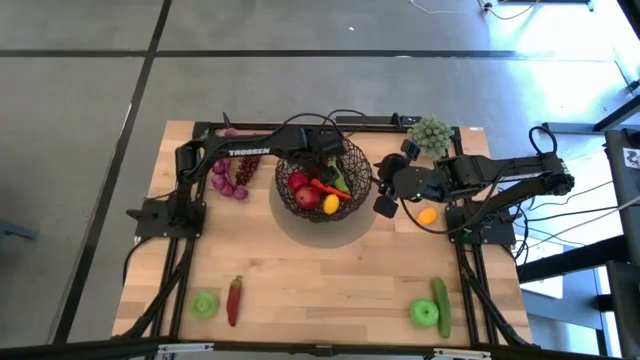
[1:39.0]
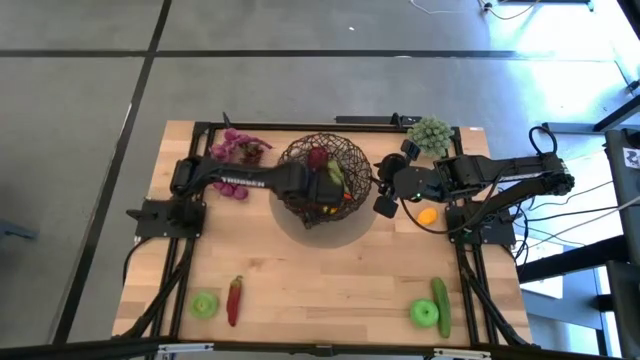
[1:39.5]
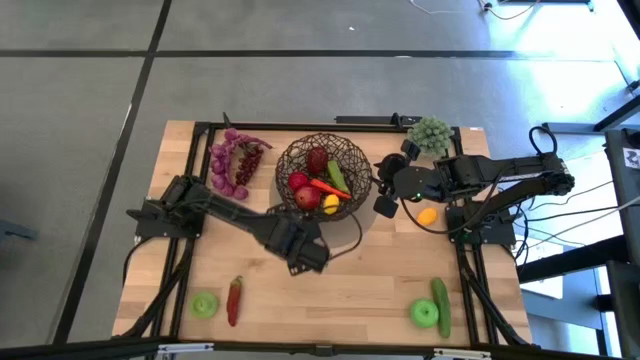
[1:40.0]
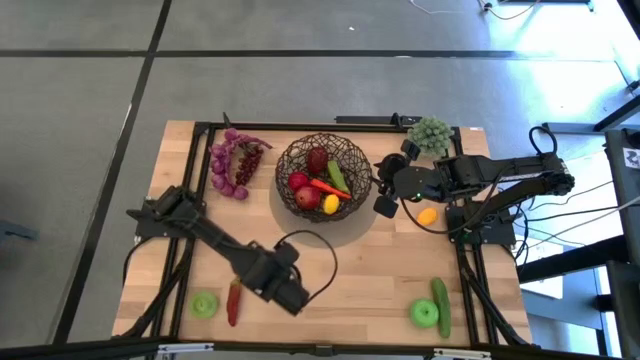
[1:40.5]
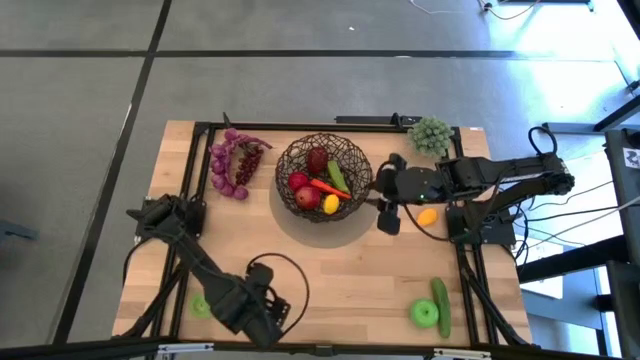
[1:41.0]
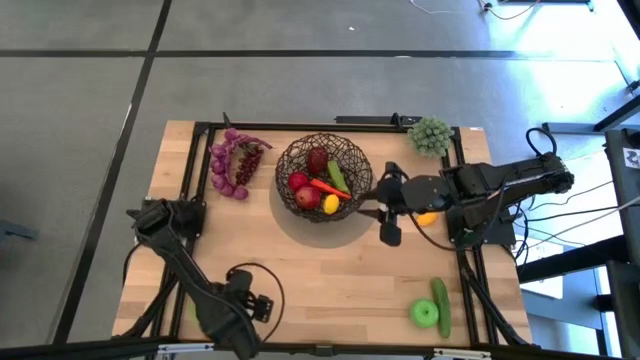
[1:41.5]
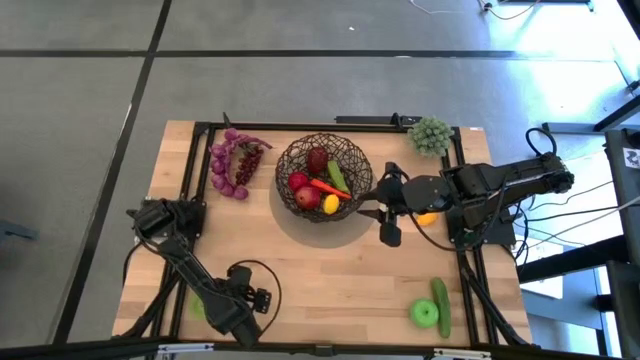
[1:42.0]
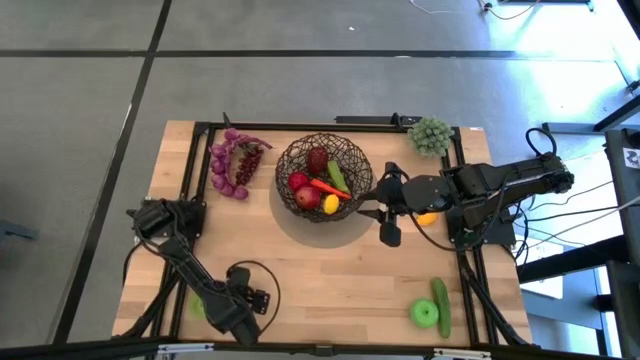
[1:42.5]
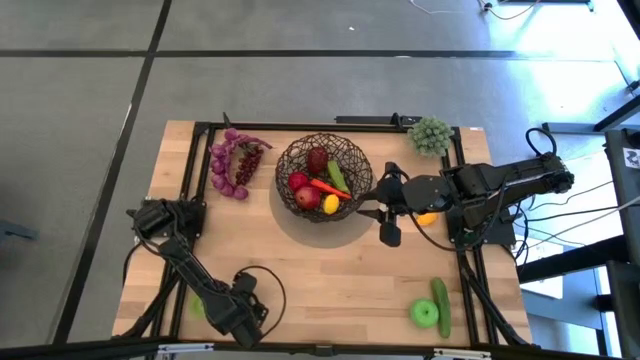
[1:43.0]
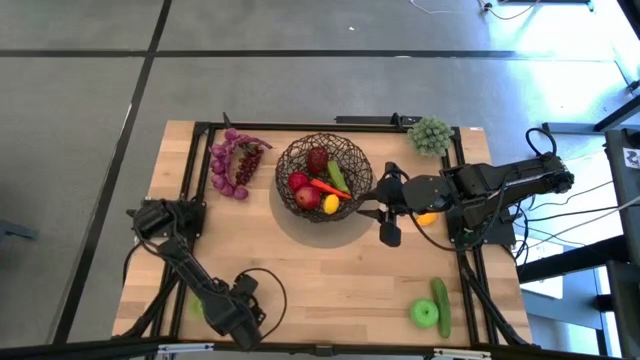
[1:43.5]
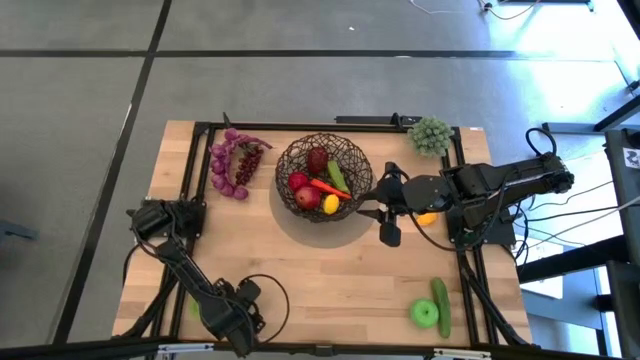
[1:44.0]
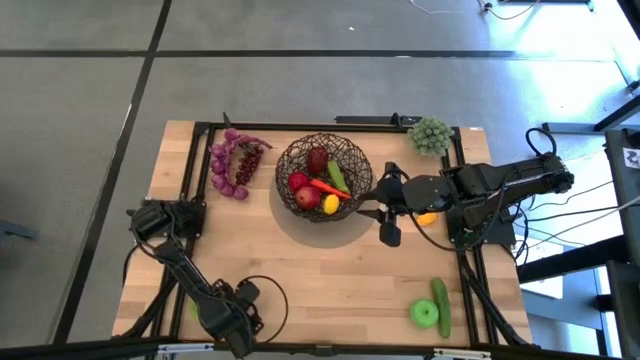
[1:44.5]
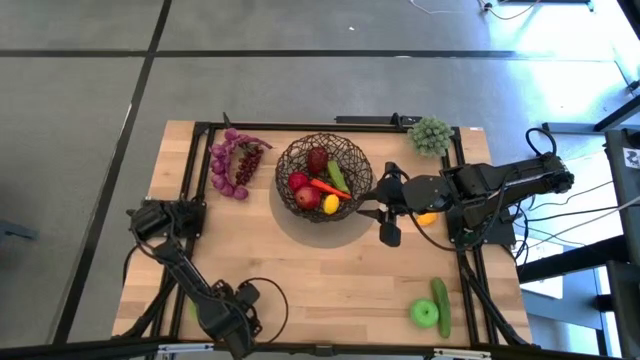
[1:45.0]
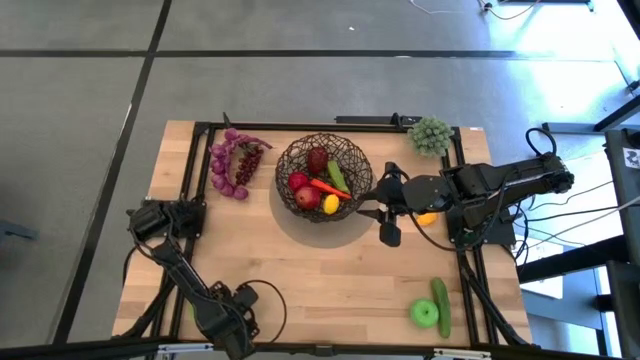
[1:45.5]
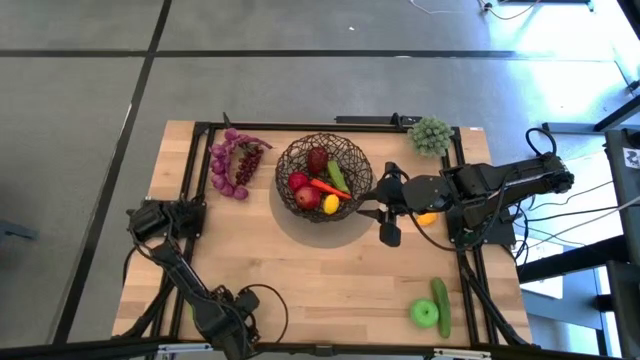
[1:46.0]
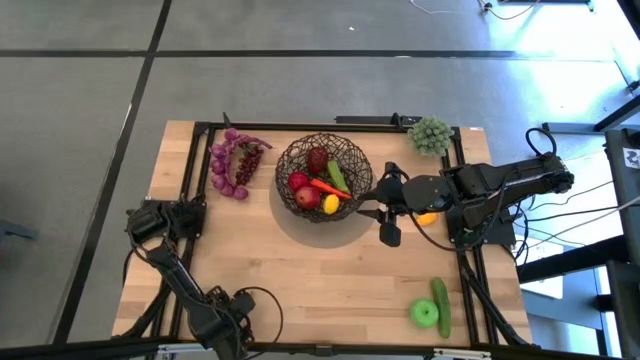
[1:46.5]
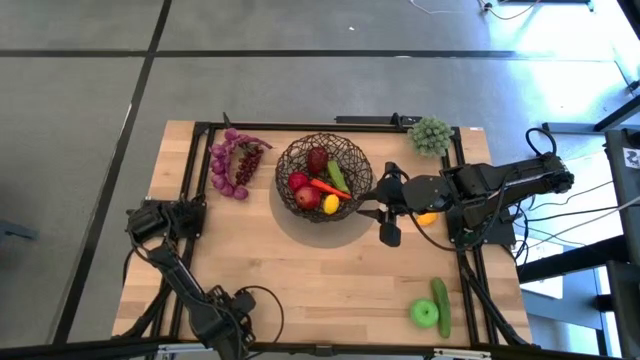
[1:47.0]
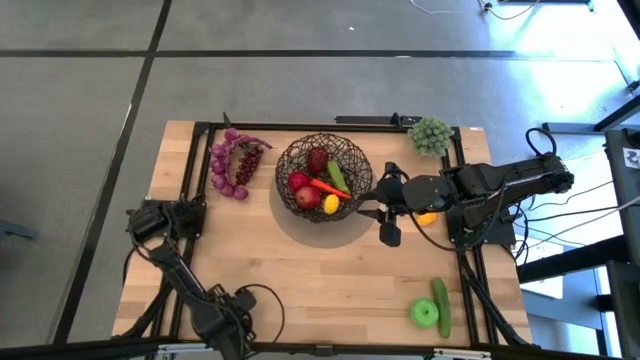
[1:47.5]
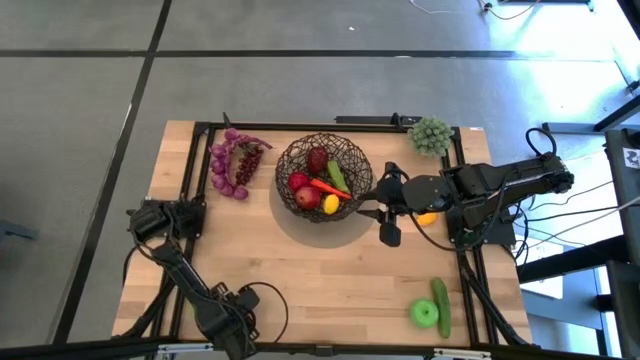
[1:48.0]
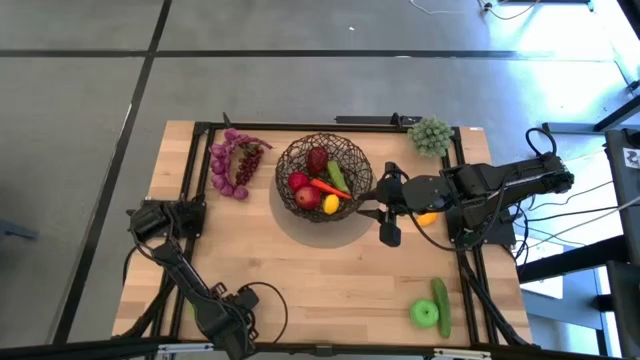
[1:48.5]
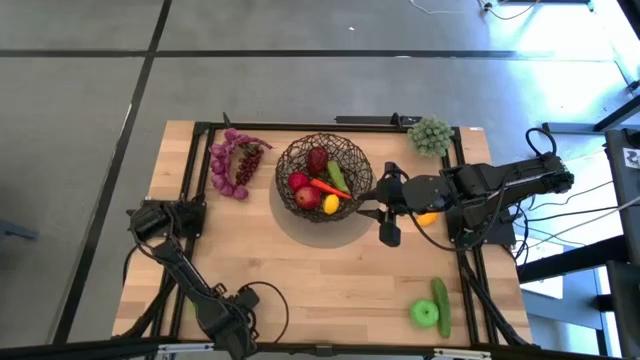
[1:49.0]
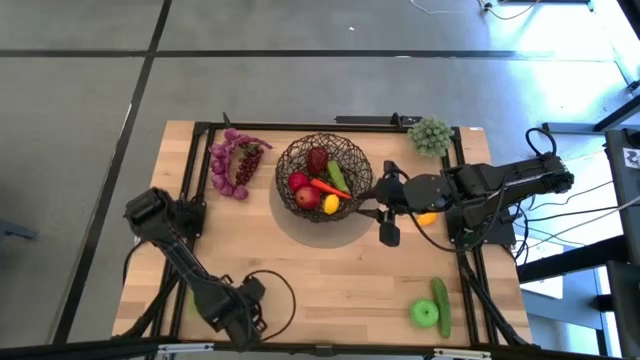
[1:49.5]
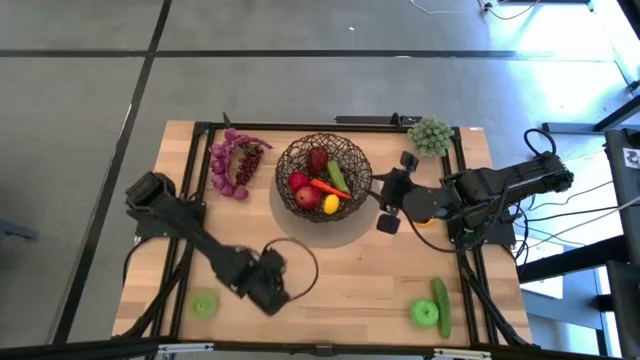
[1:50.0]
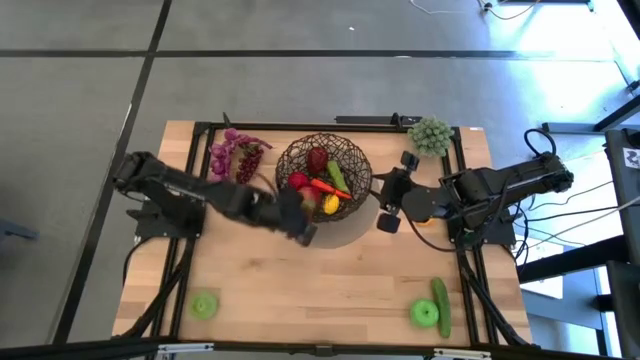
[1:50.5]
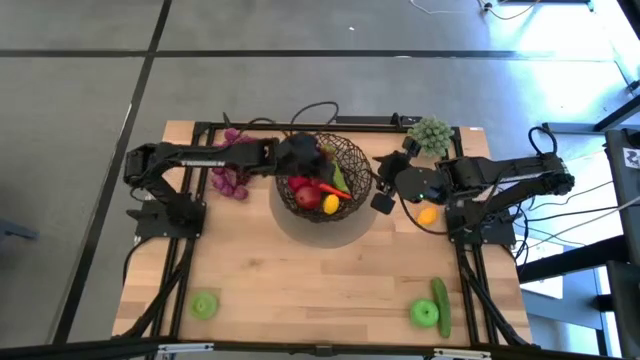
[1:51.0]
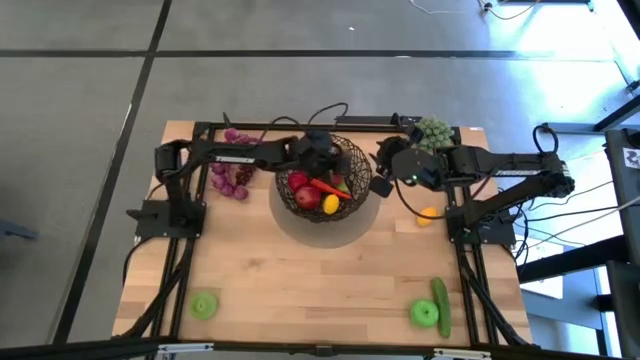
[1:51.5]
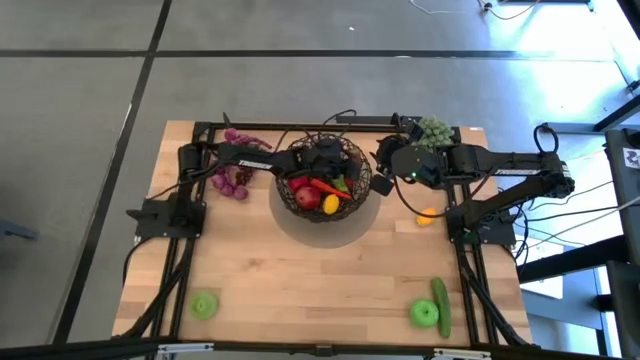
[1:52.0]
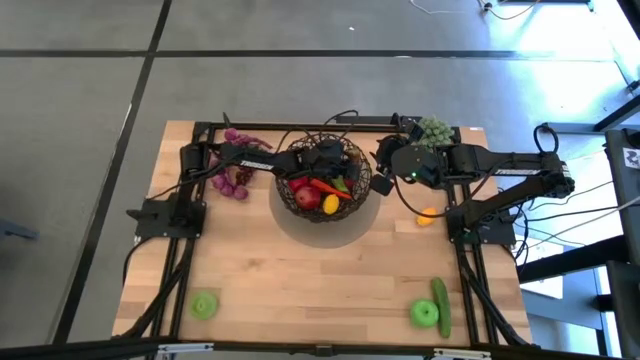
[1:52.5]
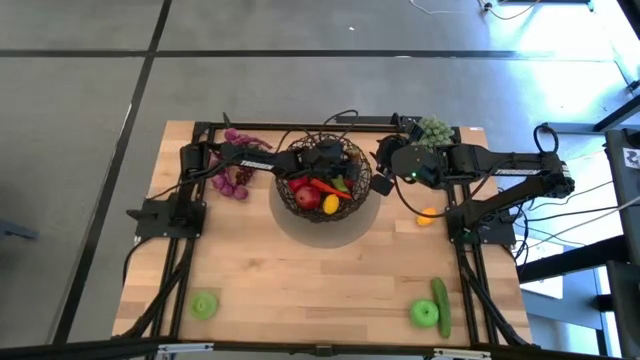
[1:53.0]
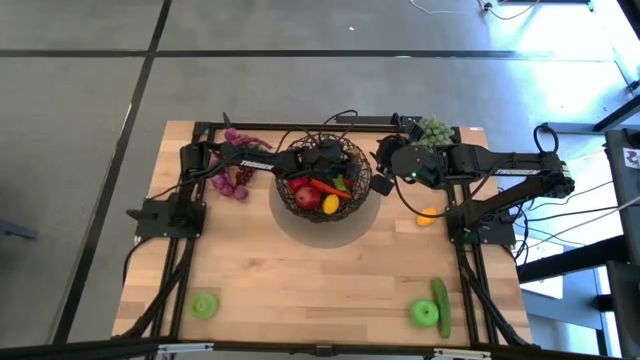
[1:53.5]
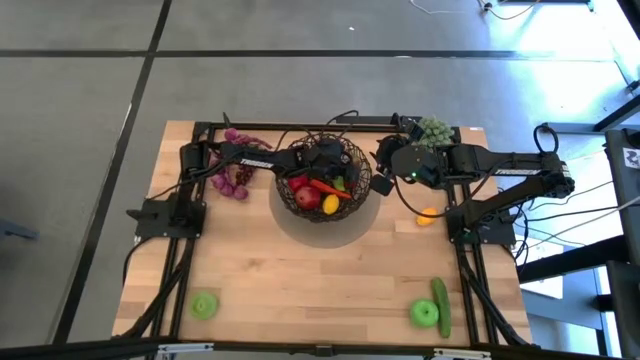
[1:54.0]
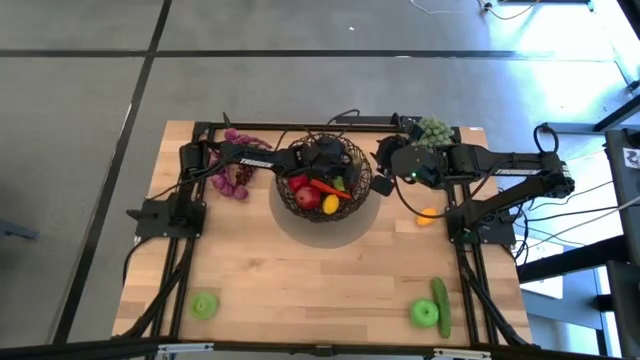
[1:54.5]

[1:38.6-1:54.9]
Task: Build produce basket
Put the chili pepper into the wire basket
